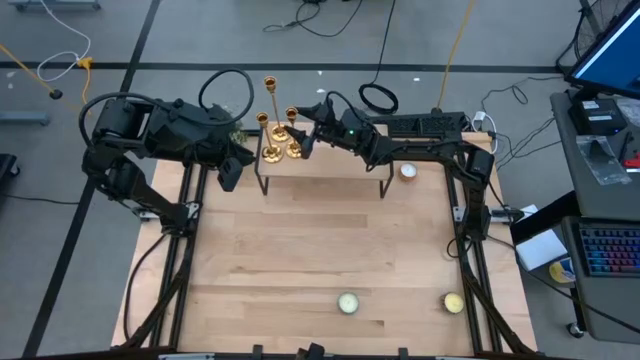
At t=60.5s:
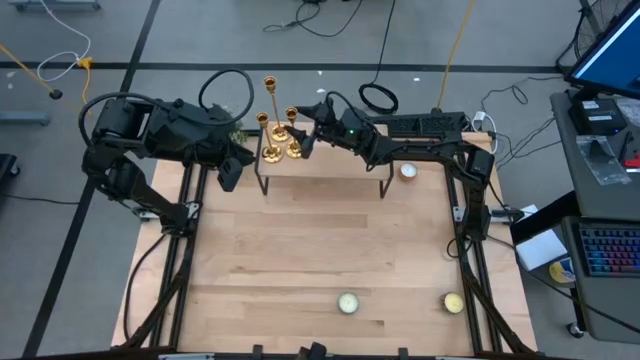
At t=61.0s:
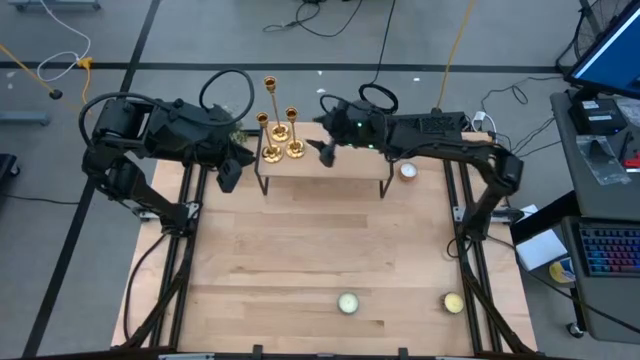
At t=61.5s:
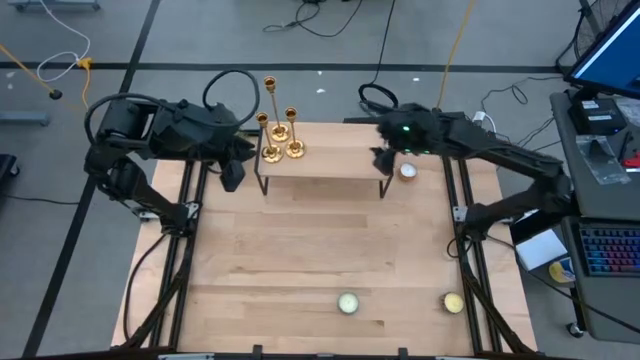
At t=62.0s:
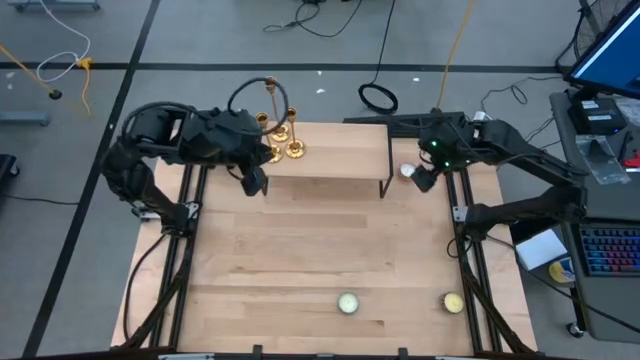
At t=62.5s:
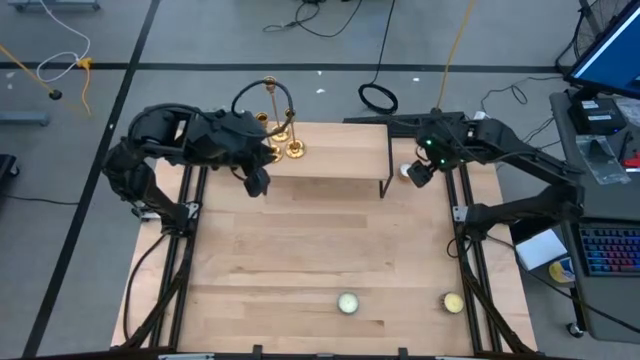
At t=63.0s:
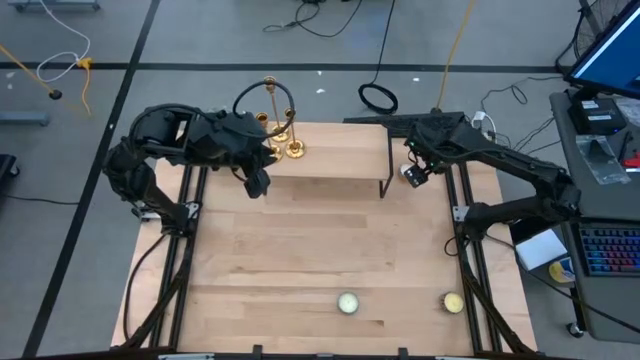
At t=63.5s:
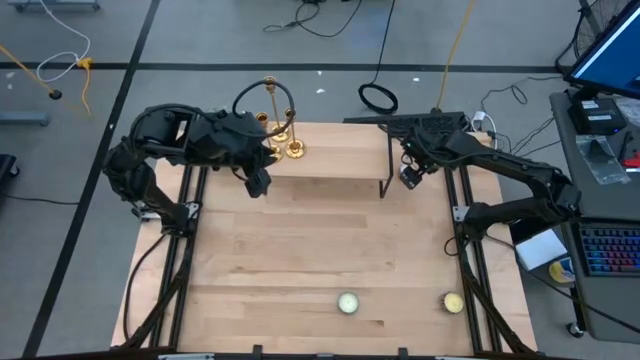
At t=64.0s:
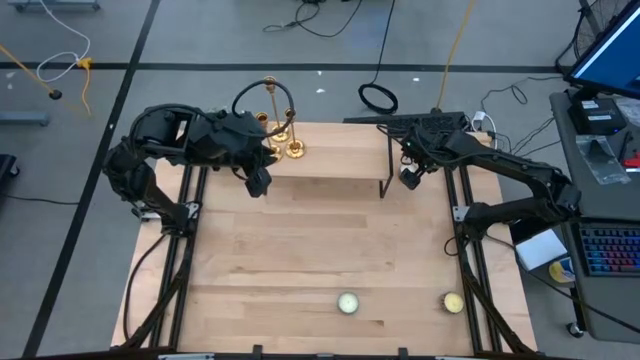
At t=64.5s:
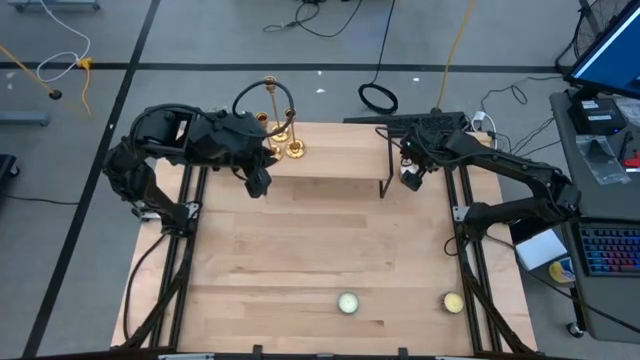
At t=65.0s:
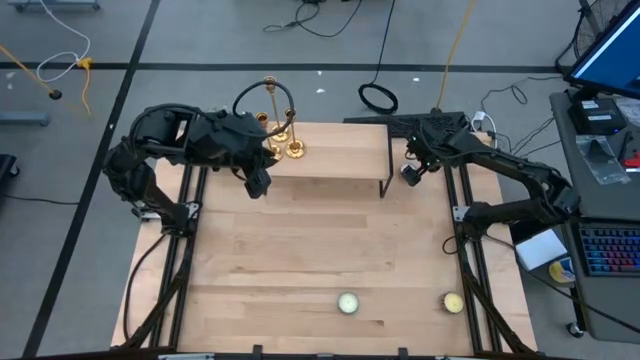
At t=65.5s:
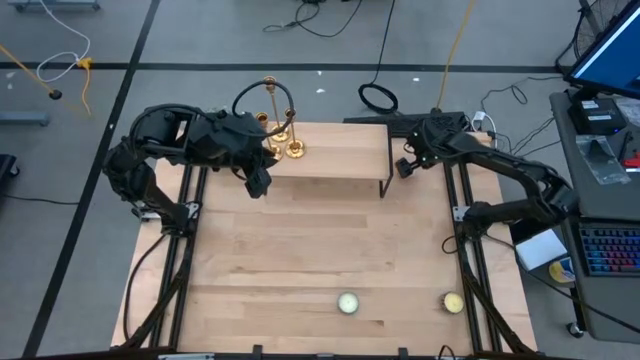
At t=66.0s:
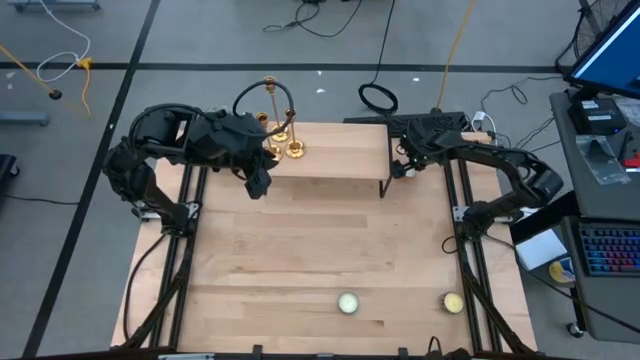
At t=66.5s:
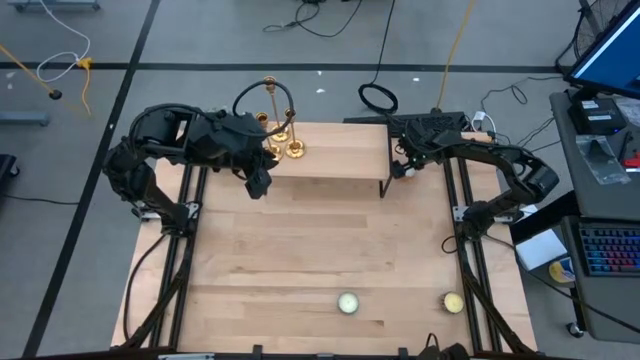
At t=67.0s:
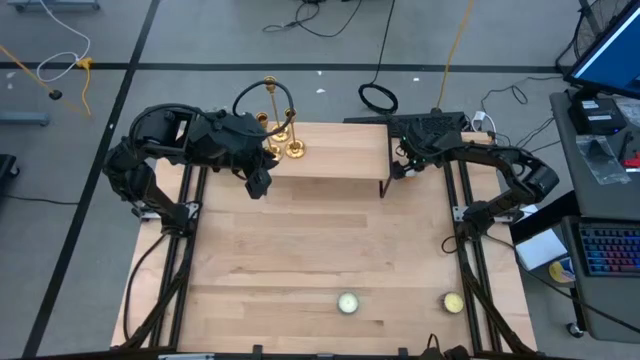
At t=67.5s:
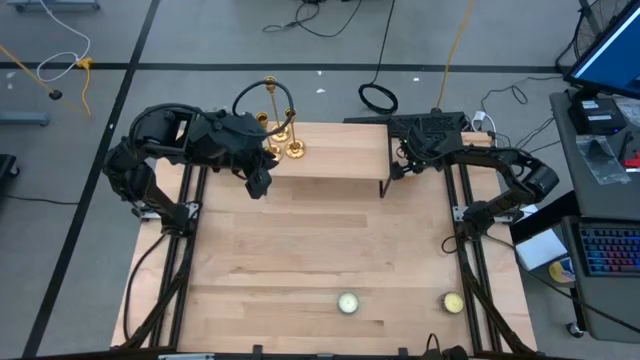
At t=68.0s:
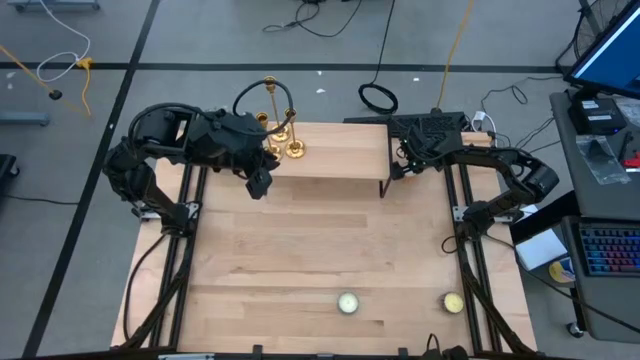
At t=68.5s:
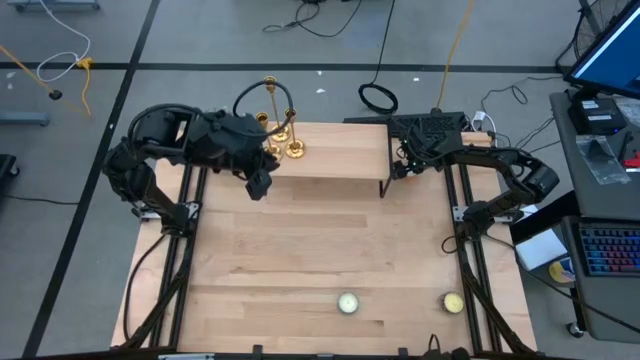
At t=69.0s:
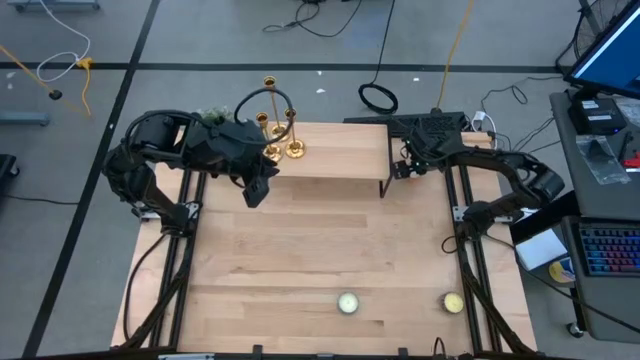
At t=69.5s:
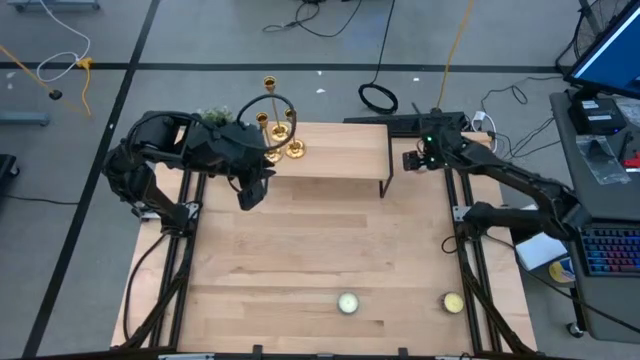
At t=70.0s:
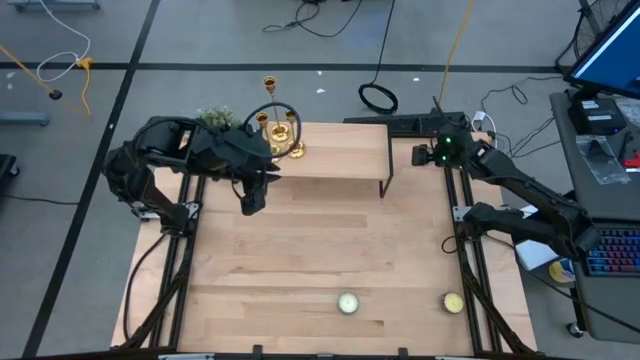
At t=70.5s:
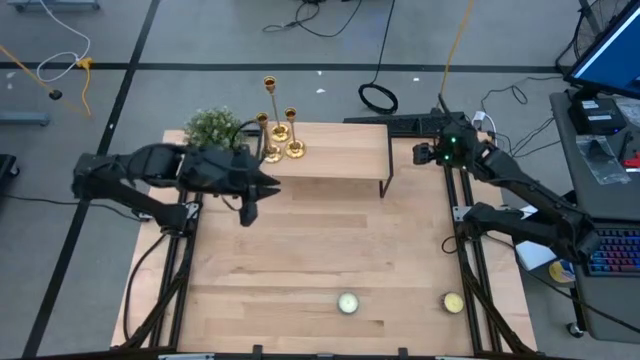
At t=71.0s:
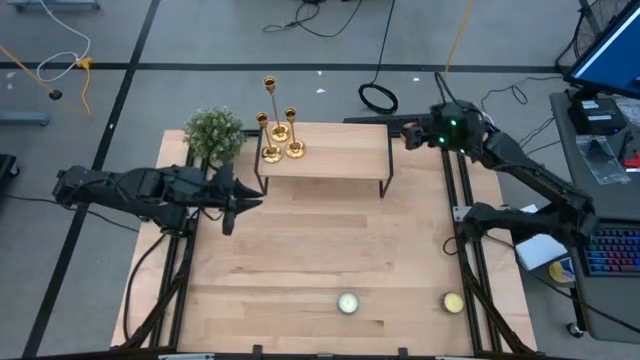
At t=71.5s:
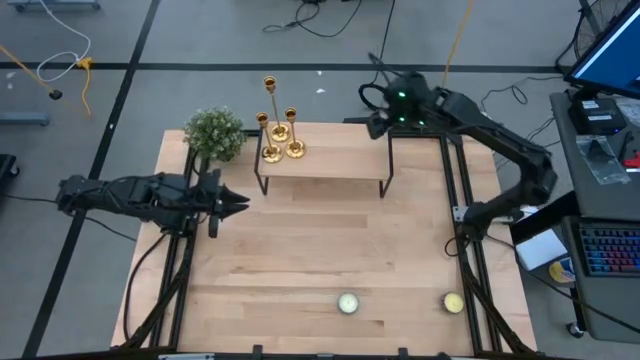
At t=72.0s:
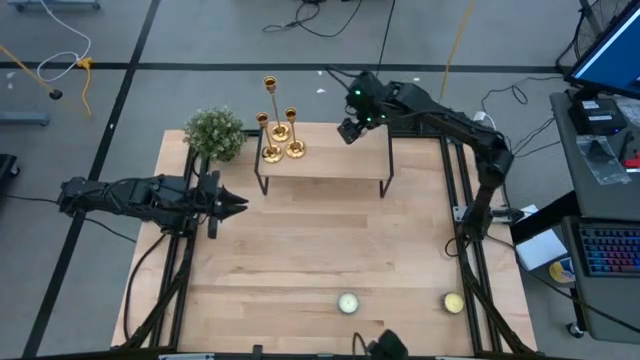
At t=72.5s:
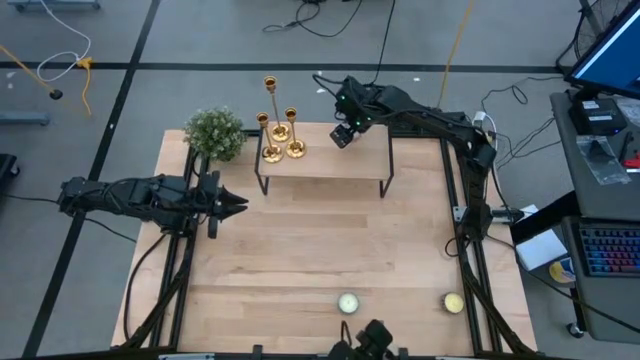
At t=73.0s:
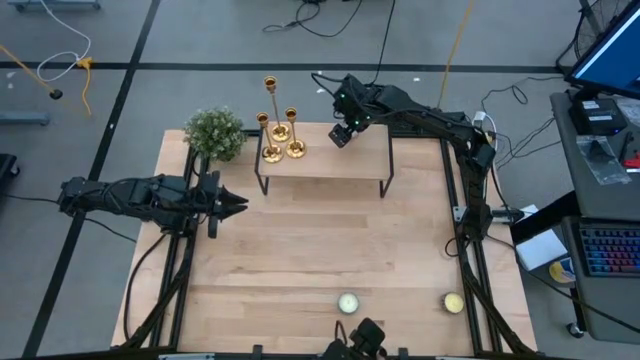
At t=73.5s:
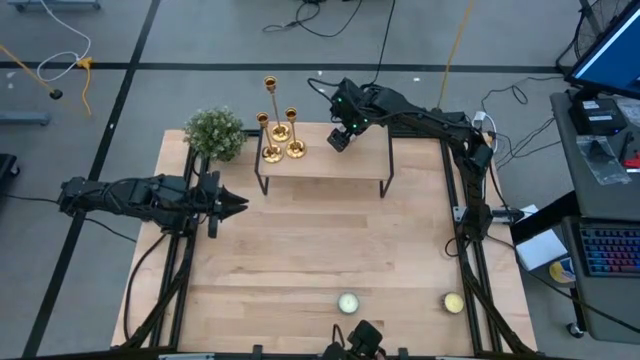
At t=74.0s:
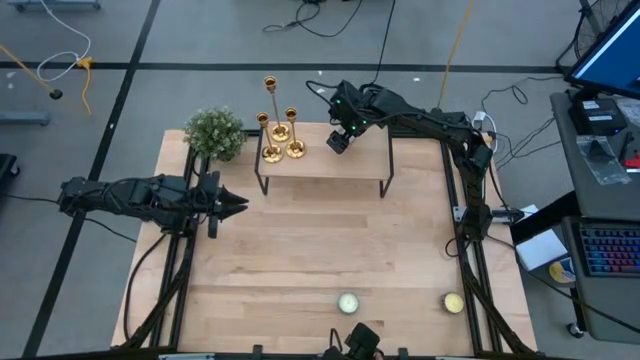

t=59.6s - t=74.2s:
Task: Pick & Place candle stick holders
Put the orange scented candle on the shelf
